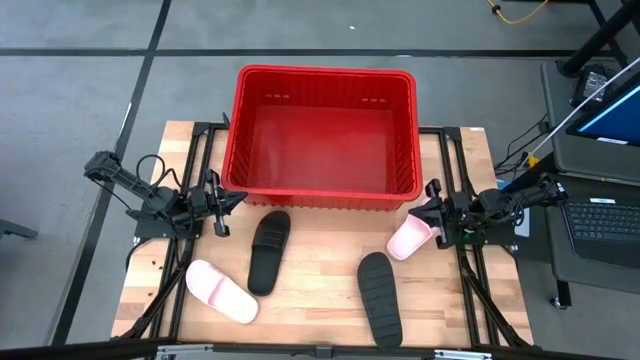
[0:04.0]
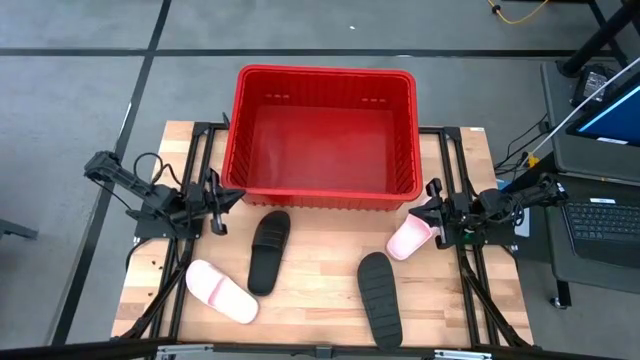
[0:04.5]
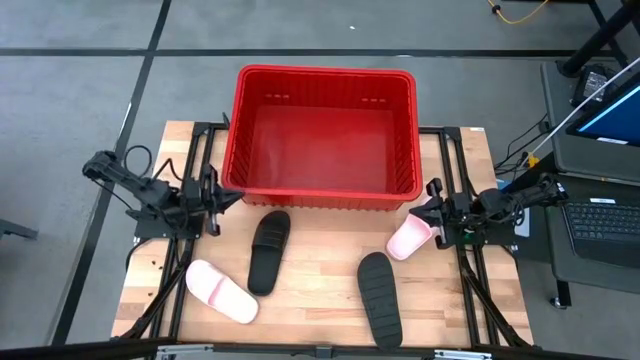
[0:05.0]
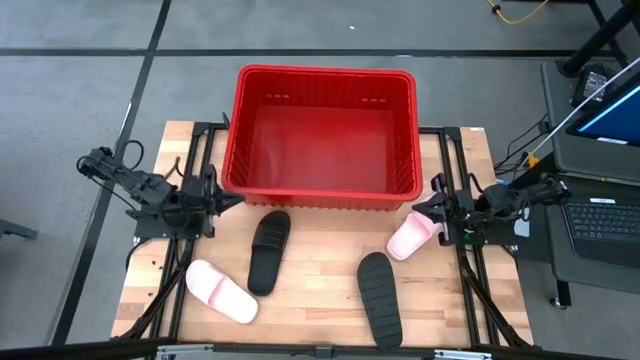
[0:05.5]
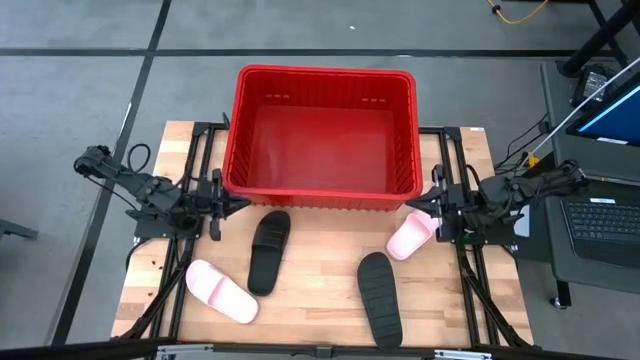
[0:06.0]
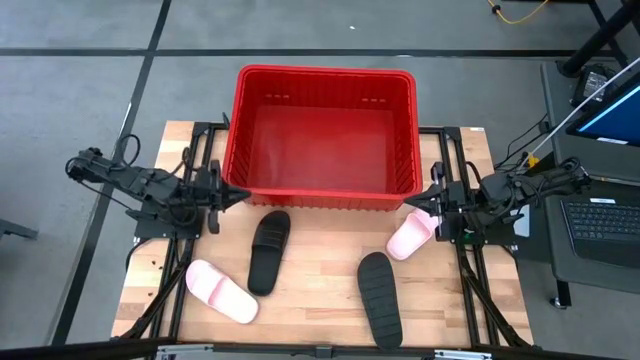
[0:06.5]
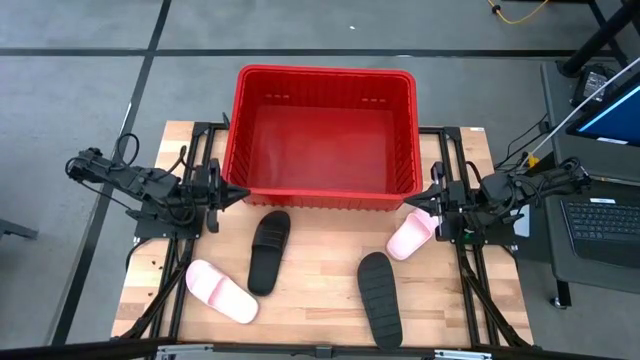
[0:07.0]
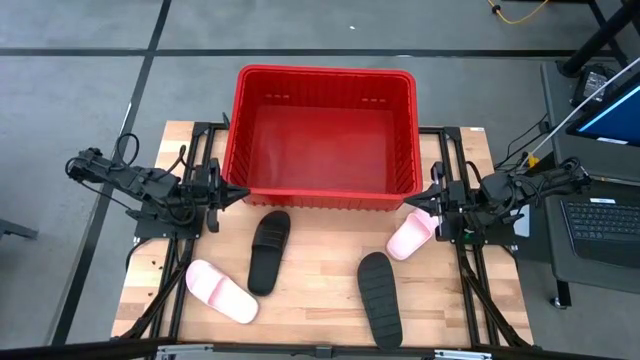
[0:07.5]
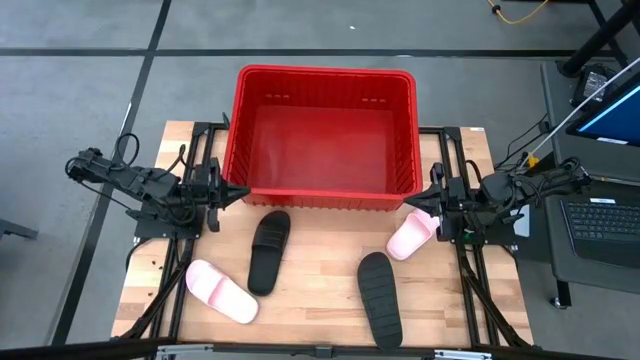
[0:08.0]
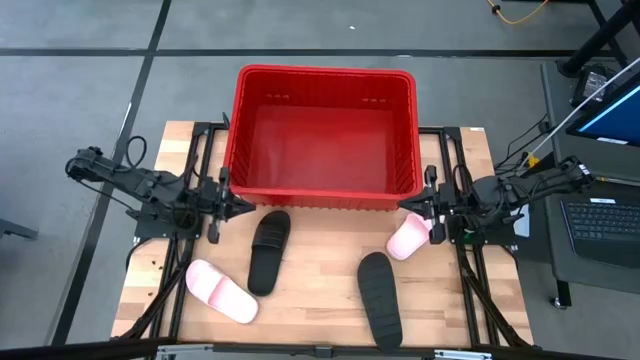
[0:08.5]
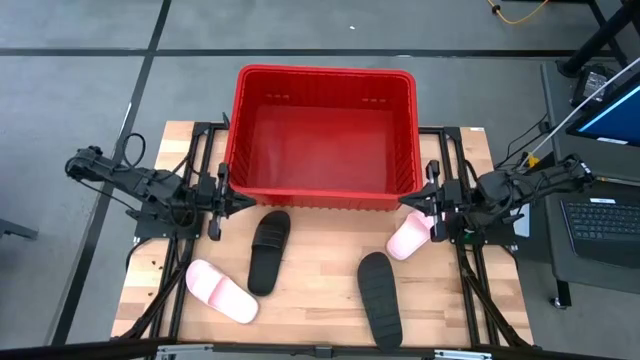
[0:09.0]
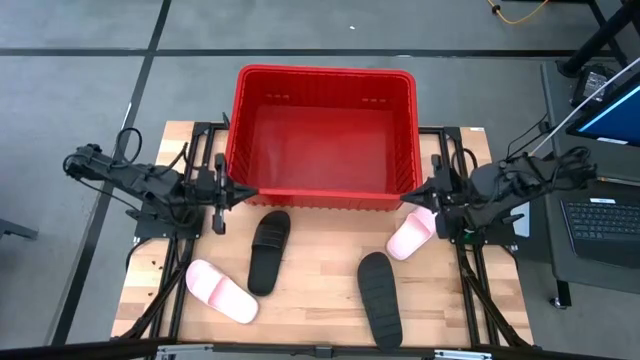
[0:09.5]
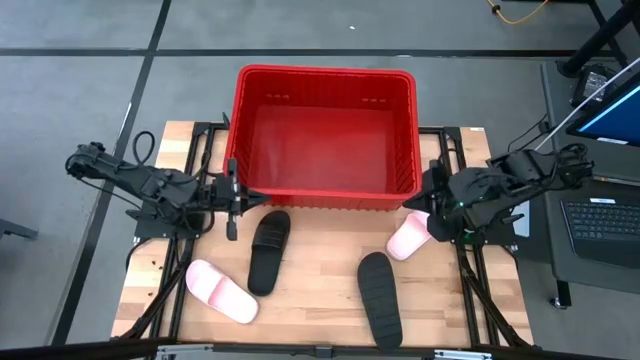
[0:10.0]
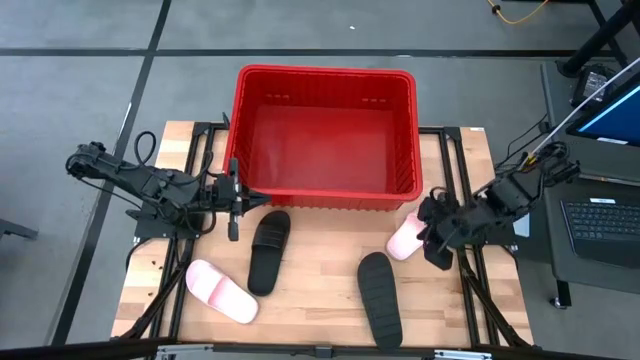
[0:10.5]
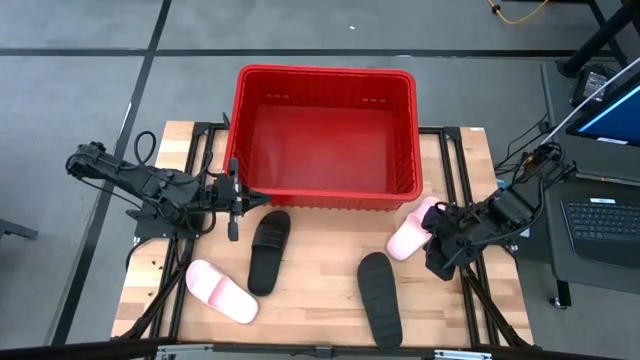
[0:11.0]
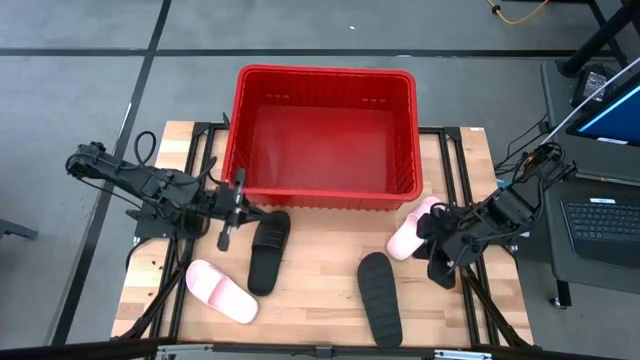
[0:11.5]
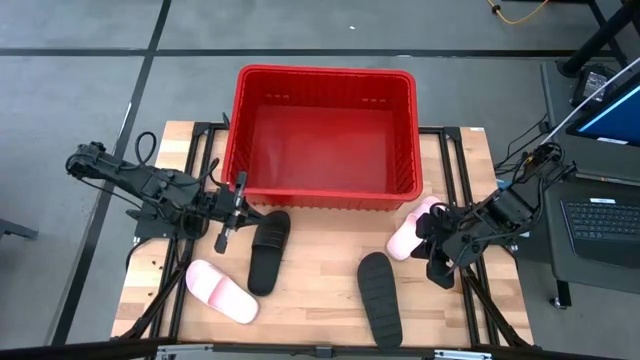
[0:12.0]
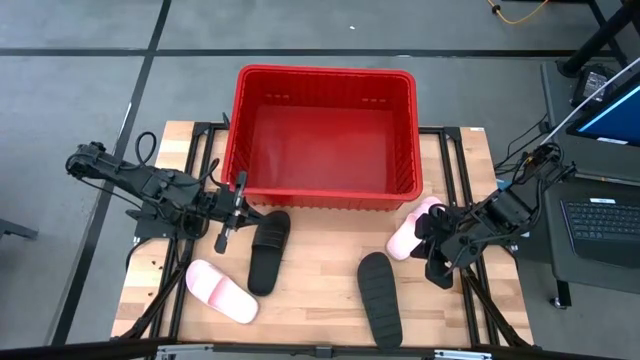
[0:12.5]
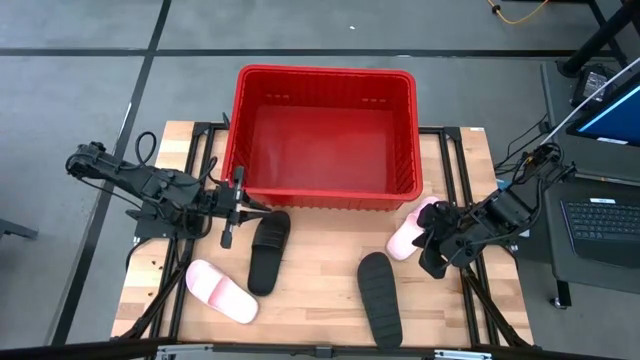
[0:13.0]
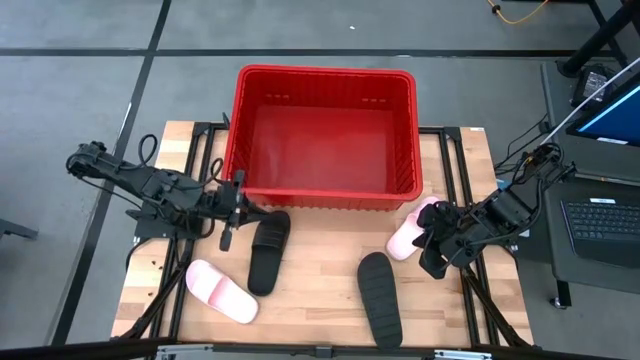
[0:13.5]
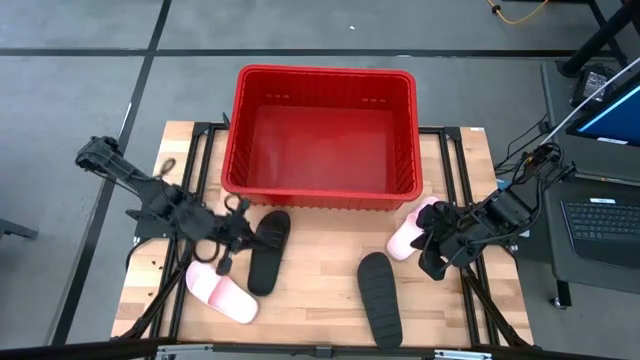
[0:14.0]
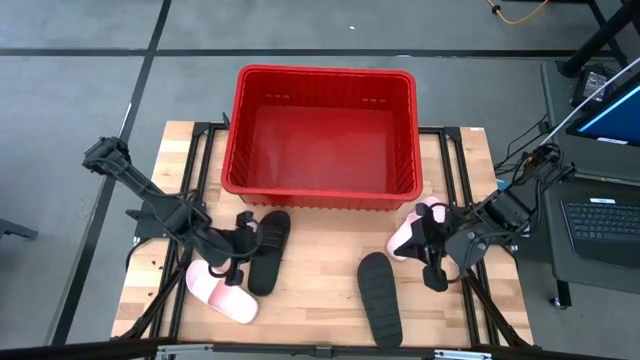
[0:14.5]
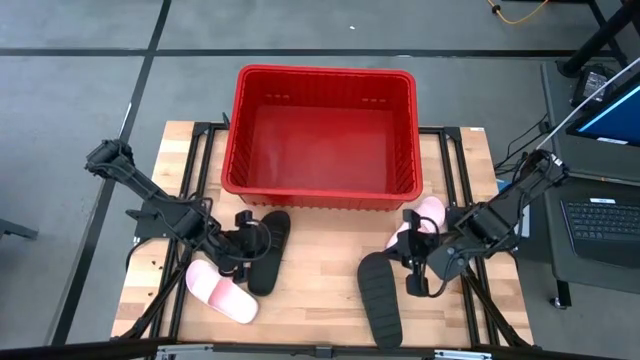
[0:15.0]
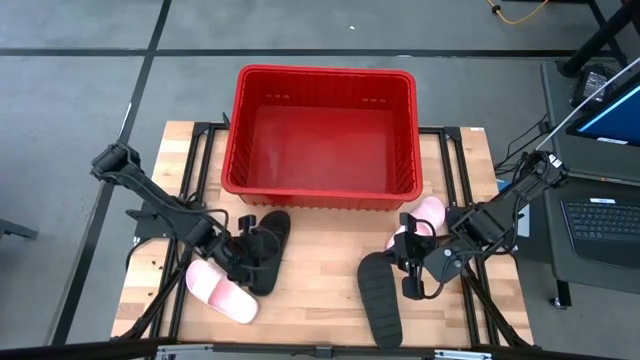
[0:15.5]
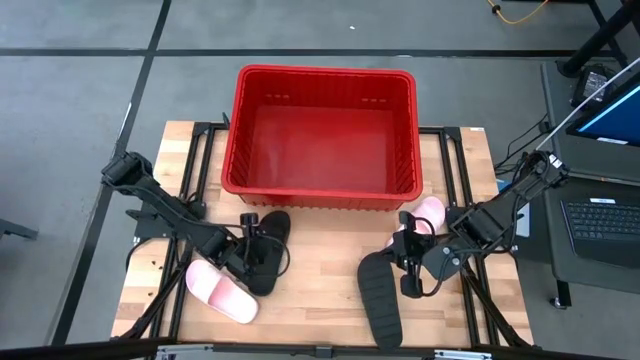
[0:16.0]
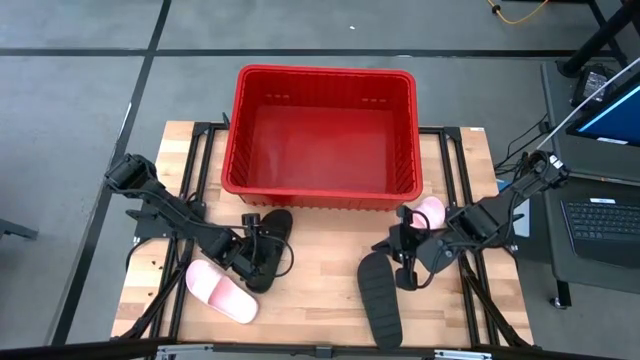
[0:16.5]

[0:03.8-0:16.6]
Task: Pick and place slides into bin
Put the left black slide into the red bin
